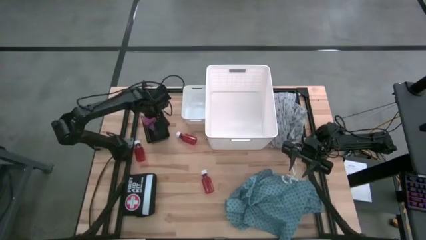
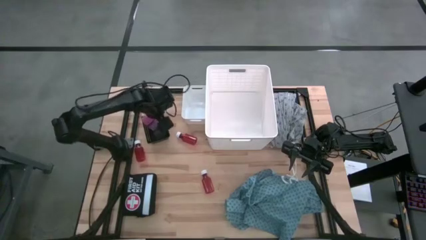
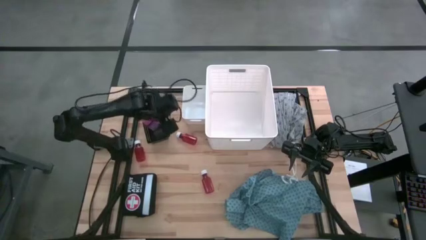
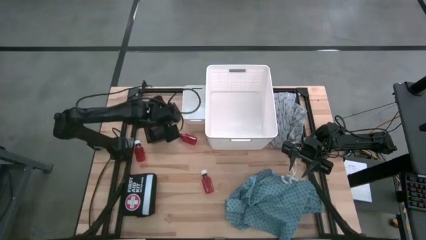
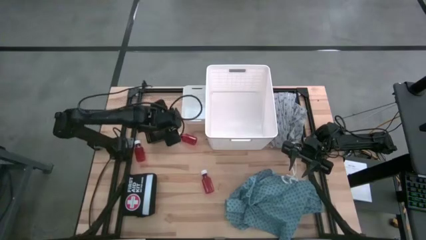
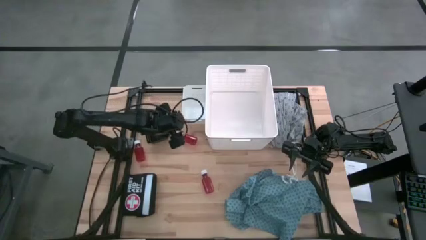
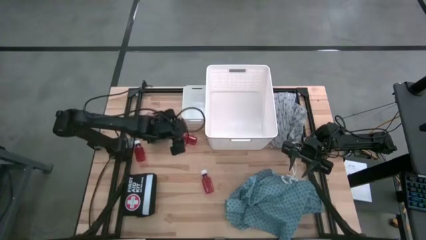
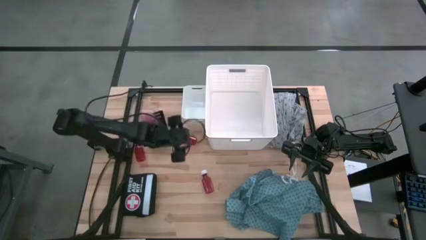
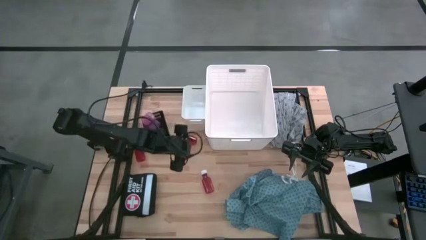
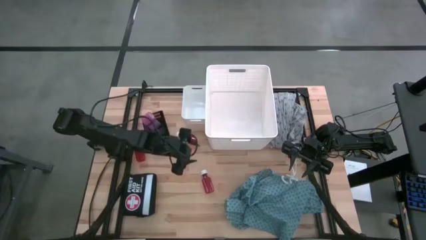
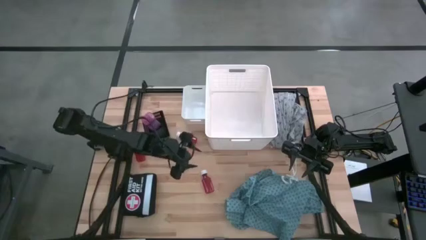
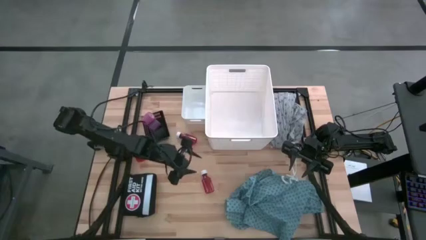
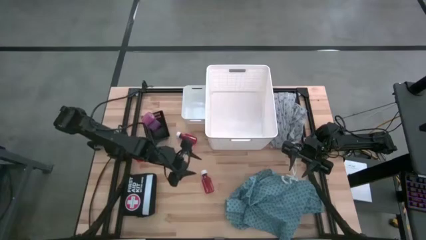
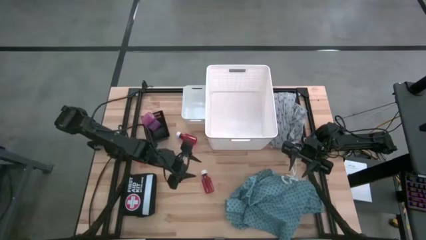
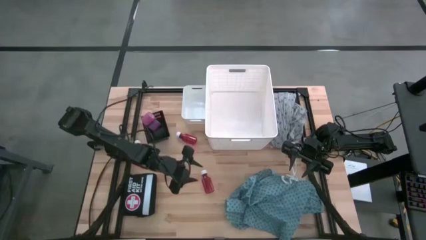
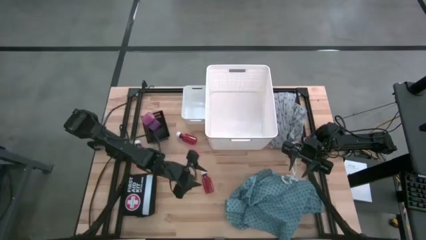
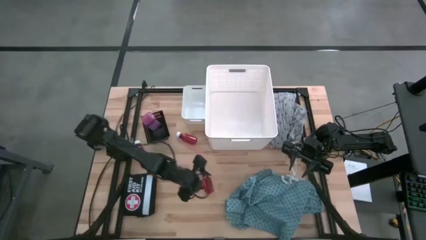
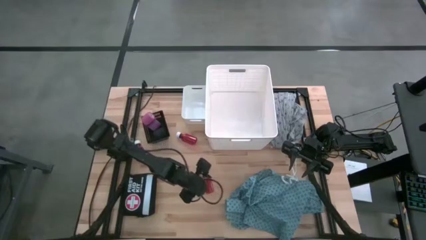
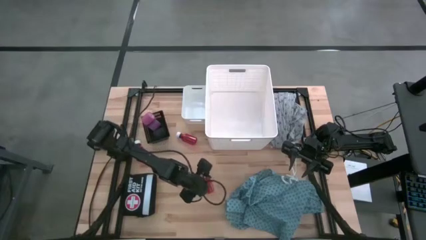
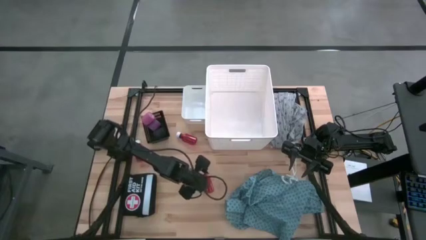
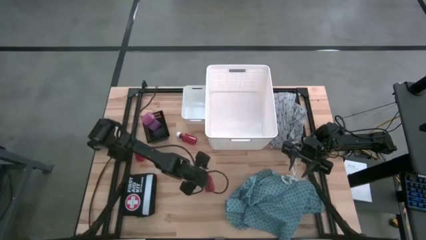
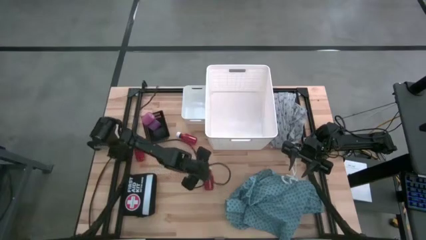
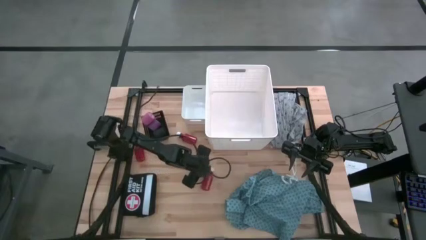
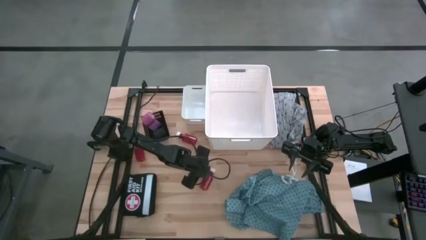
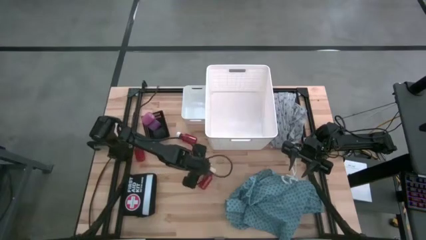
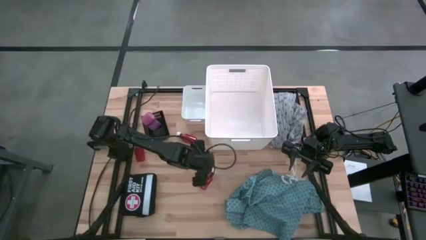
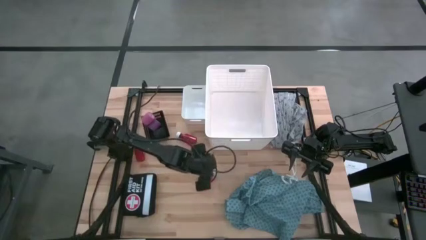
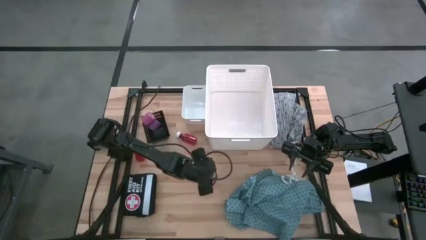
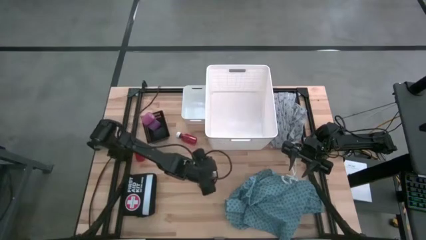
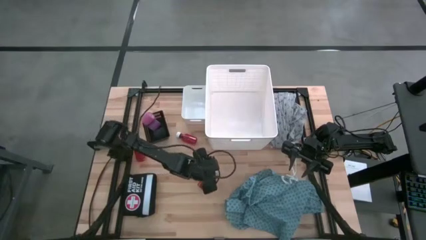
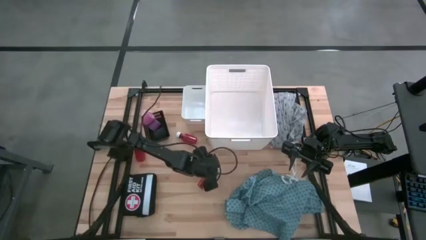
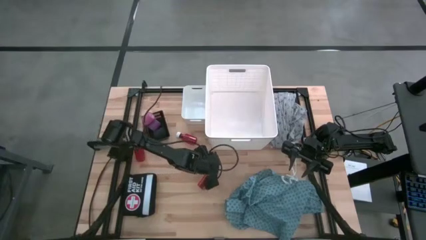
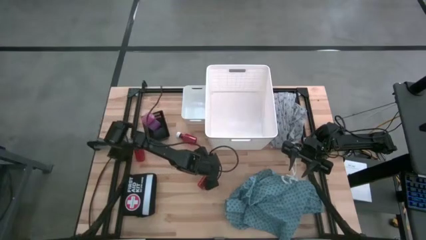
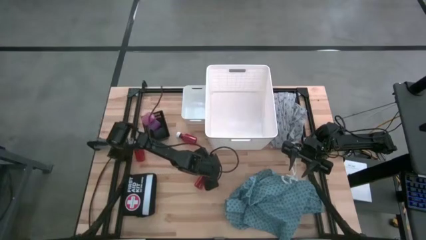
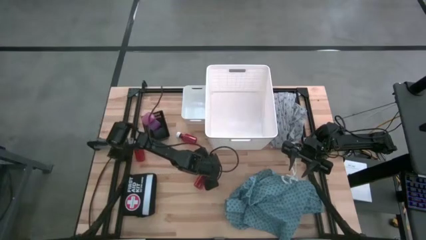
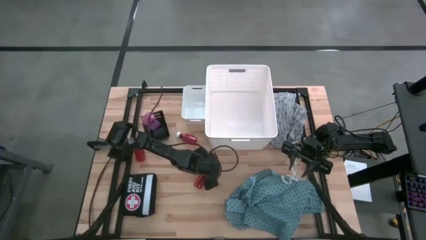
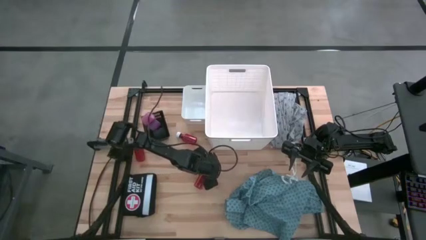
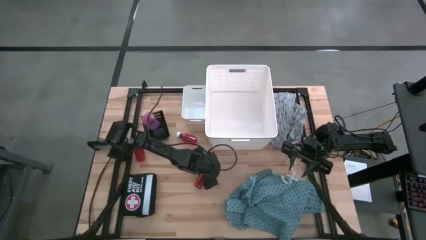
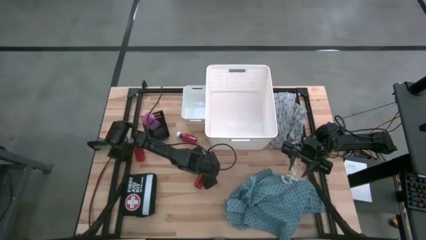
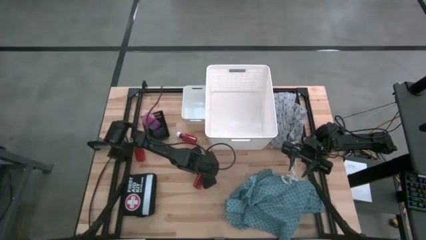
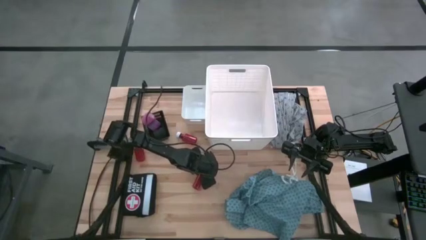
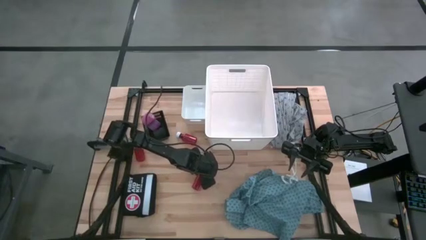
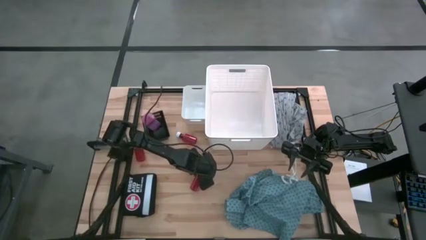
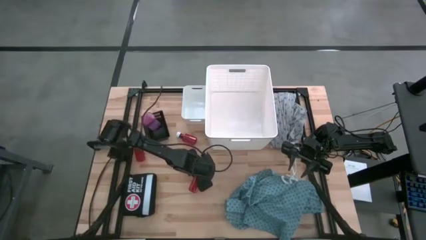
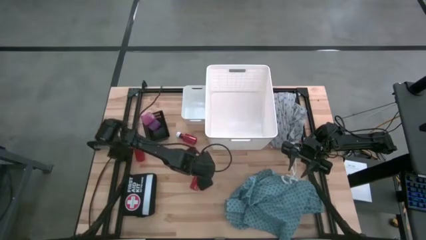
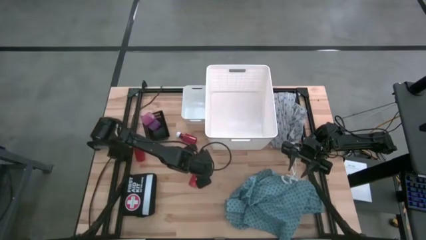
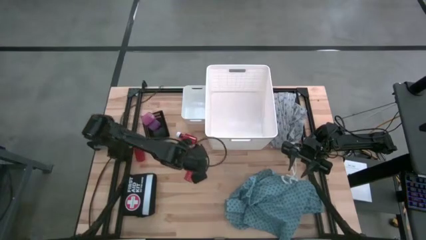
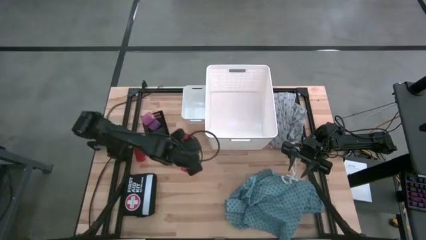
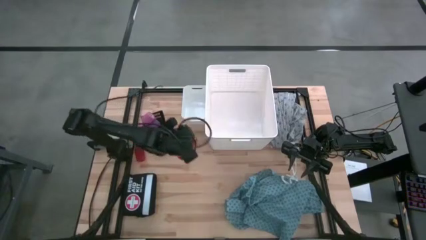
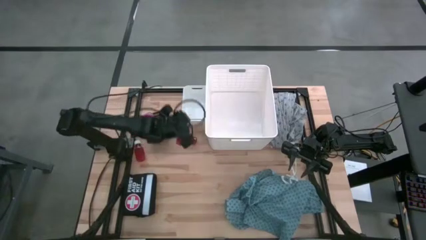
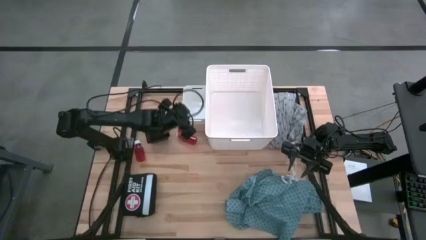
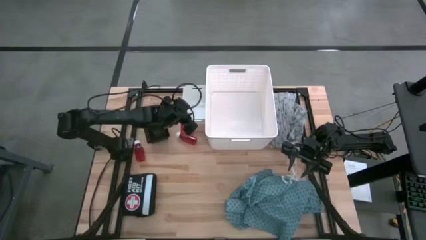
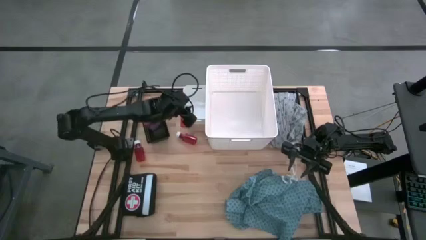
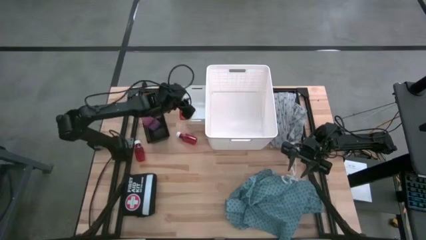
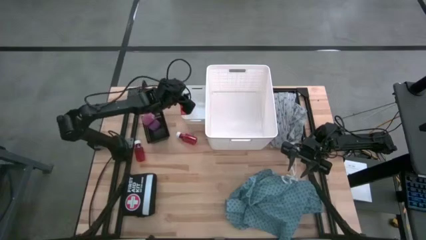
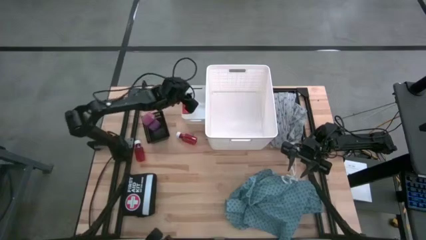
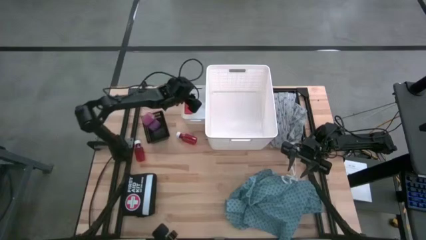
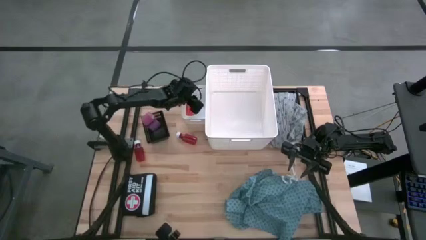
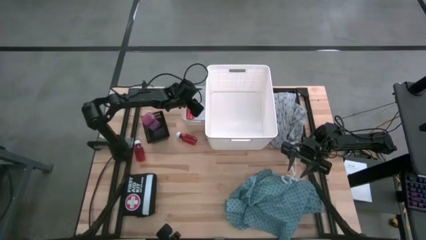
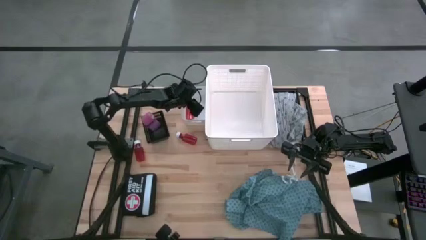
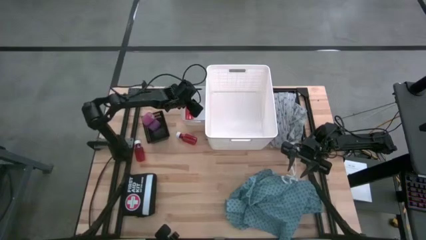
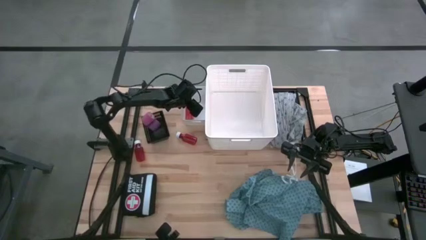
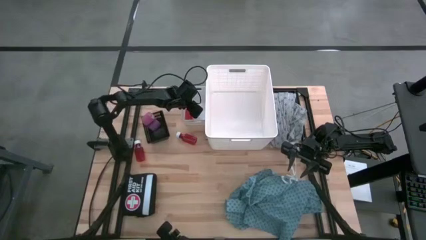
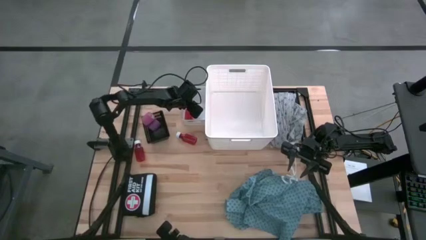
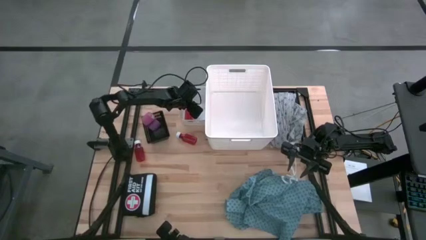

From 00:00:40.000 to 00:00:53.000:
Task: Pick & Place Medicine items
Put the bottom red pill bottle into the white bin

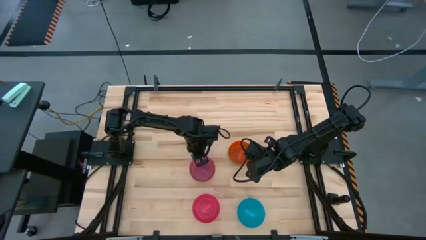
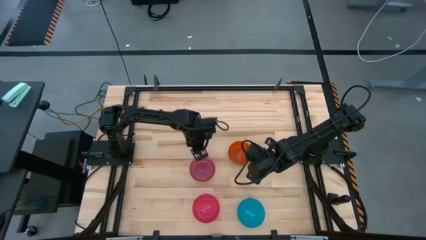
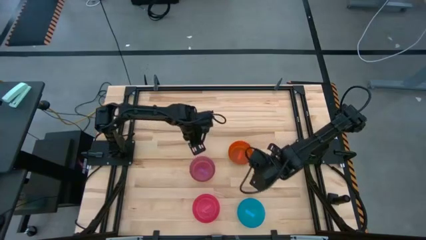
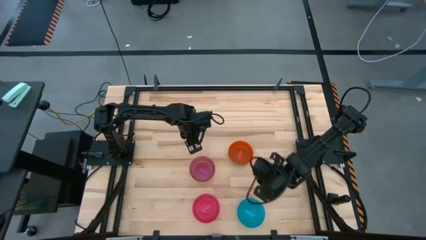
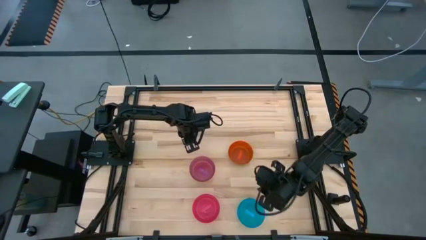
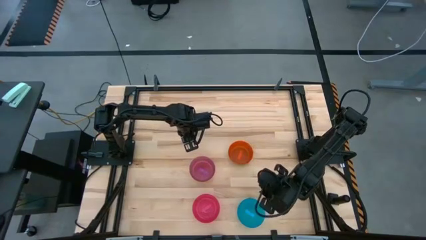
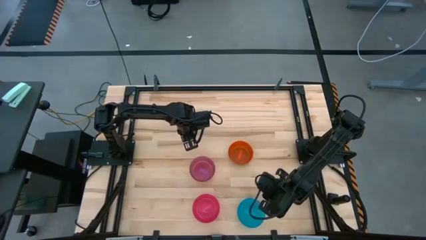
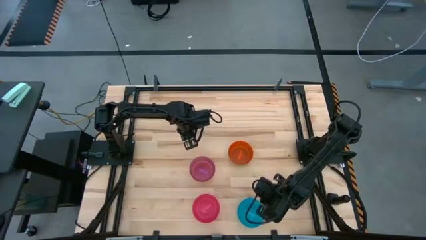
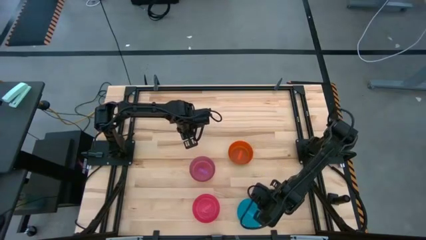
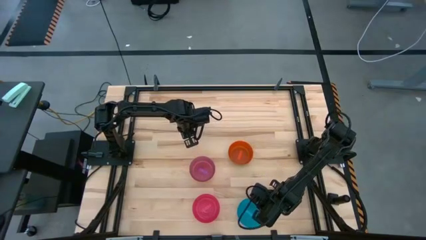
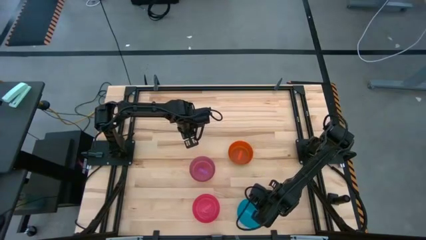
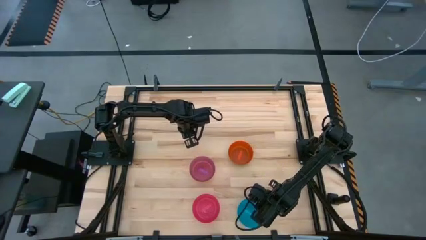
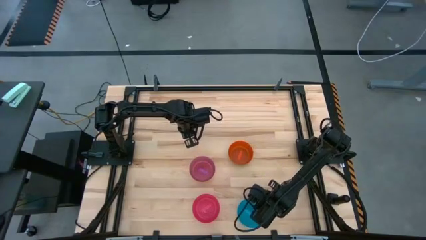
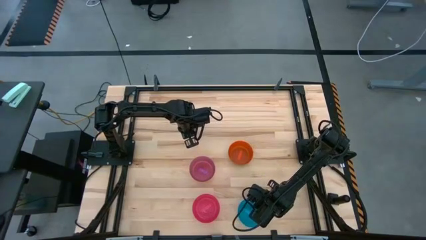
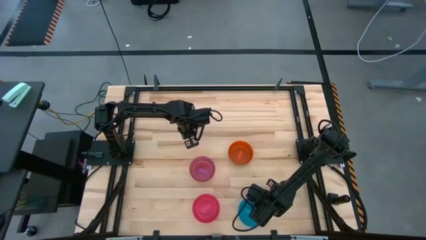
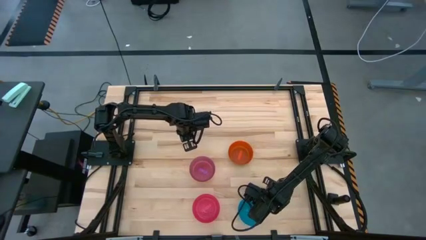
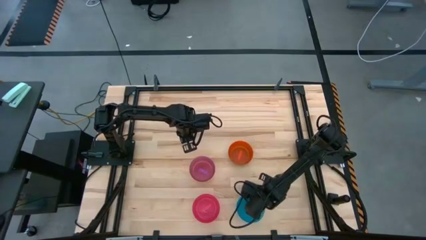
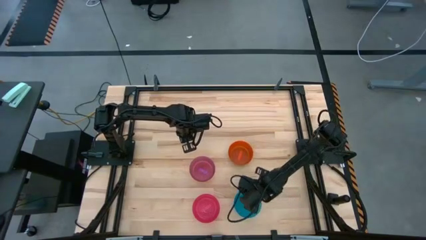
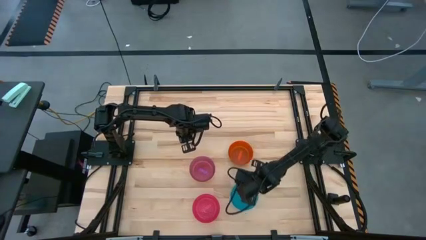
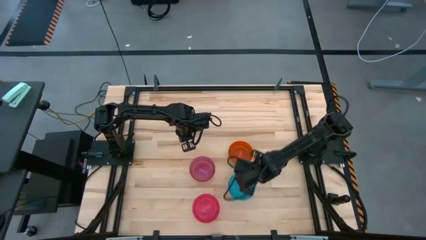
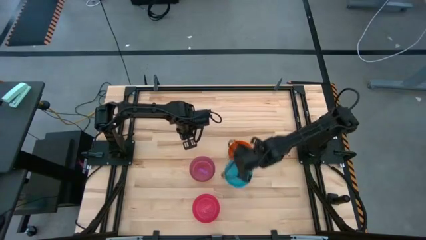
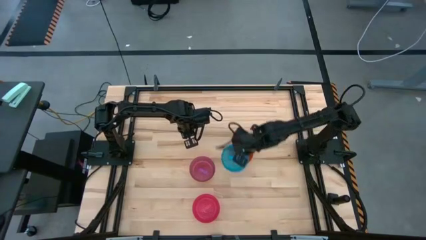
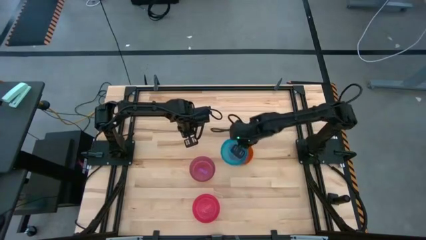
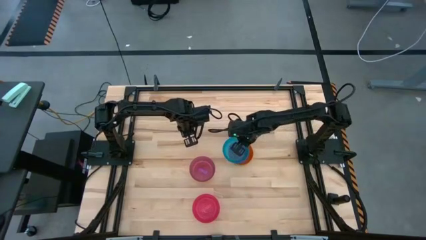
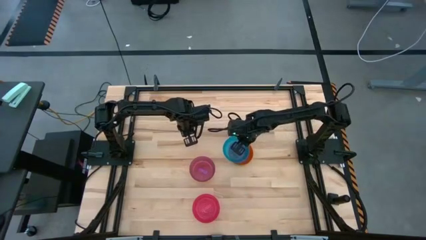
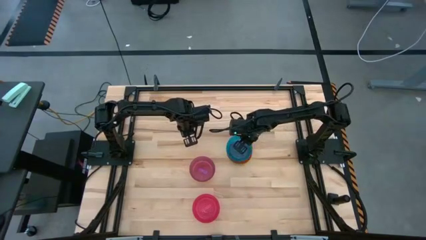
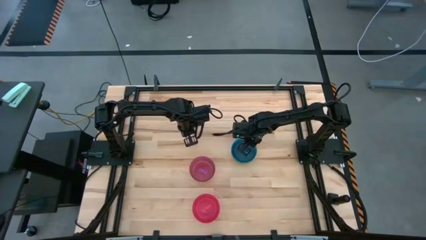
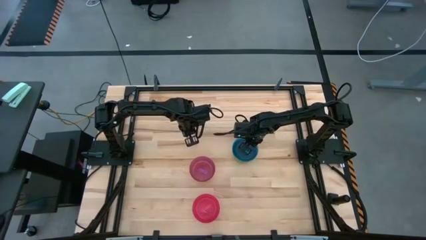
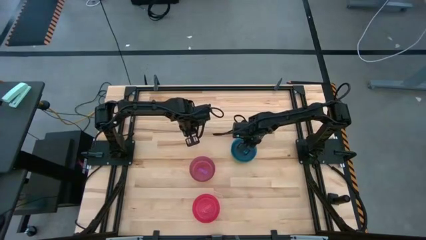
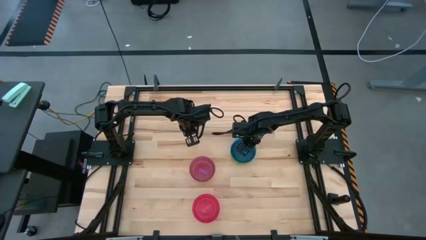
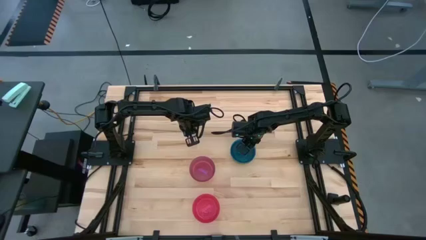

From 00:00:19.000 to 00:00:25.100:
Task: Nest bowls inside each other
Stack the blue bowl on top of the orange bowl
